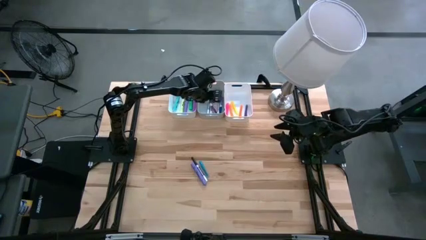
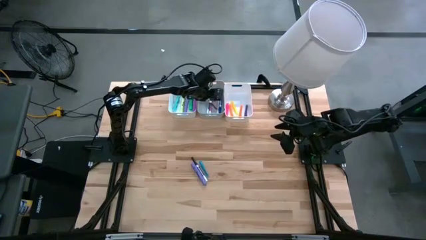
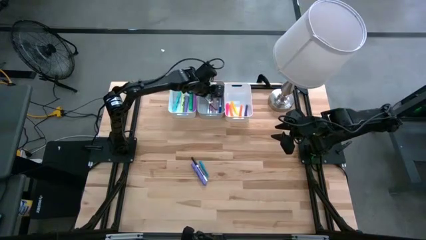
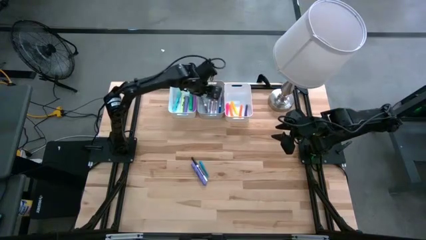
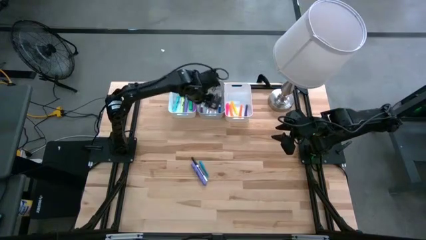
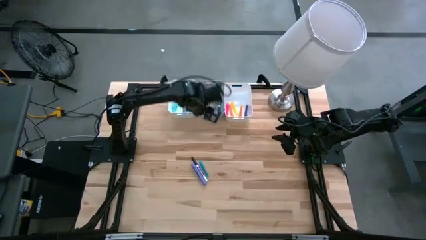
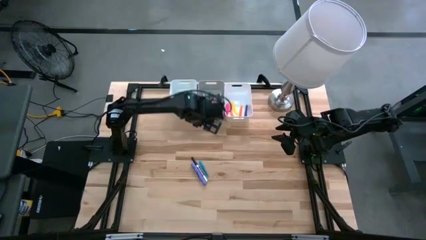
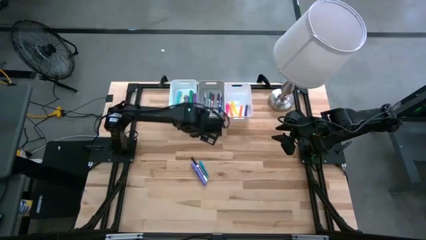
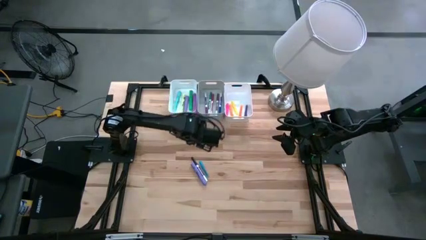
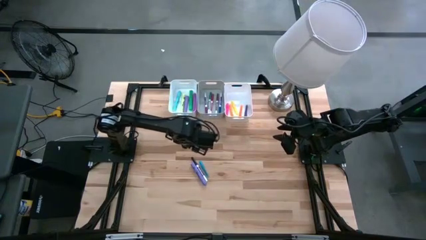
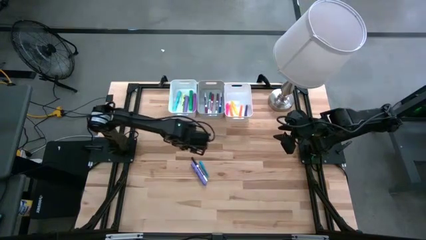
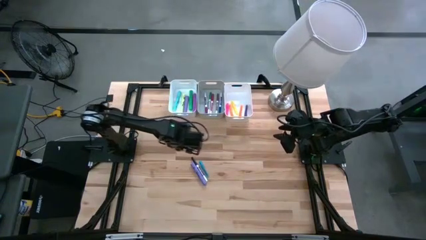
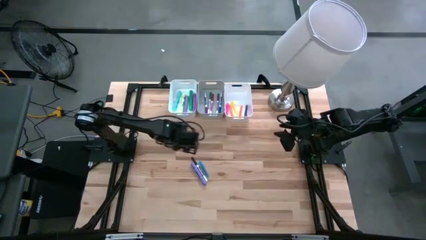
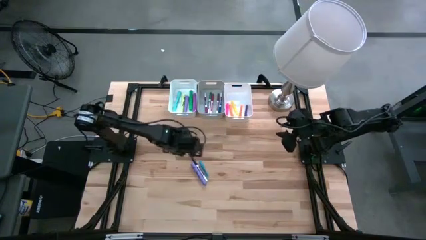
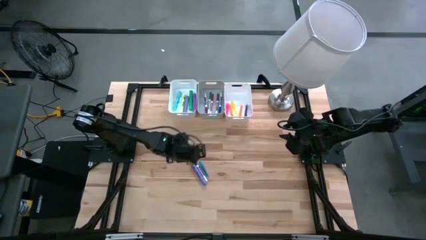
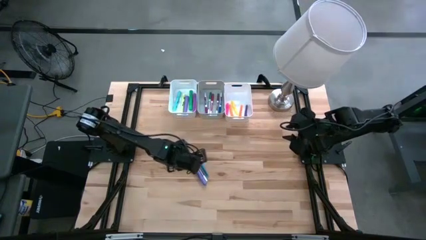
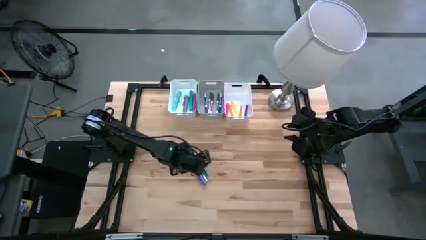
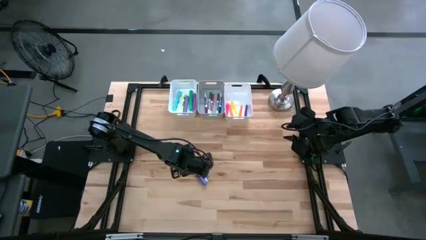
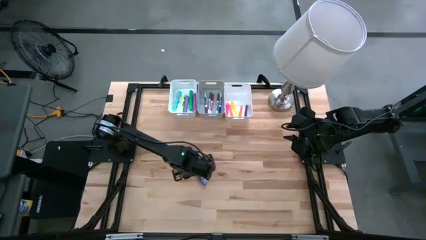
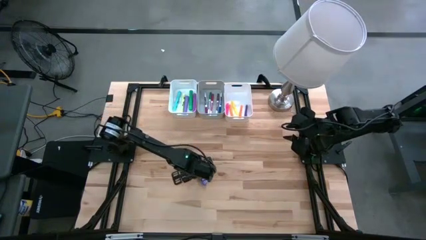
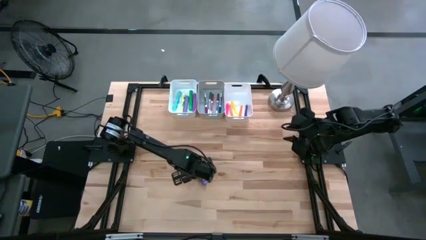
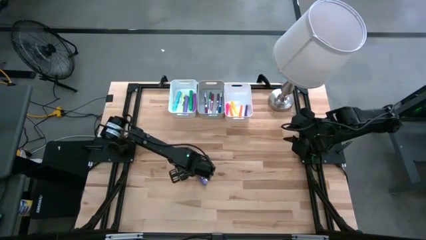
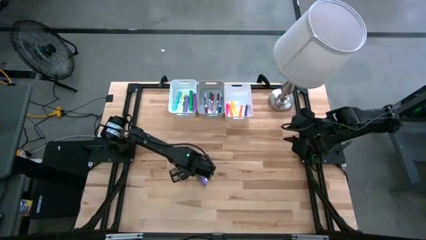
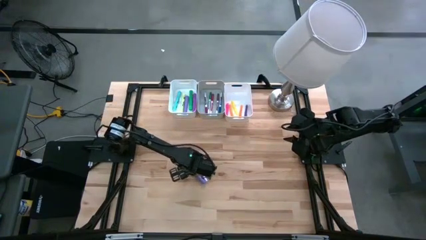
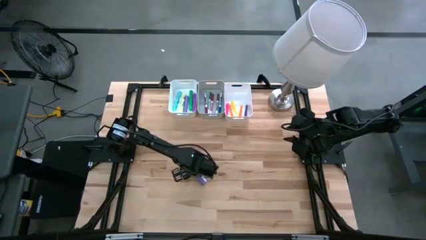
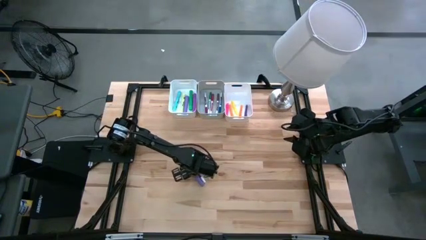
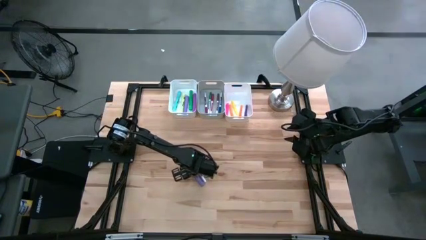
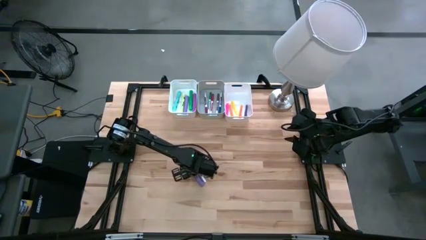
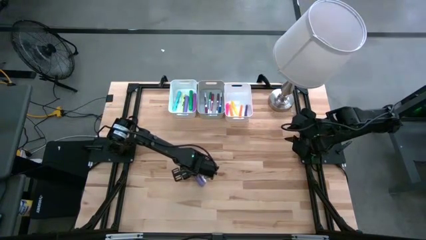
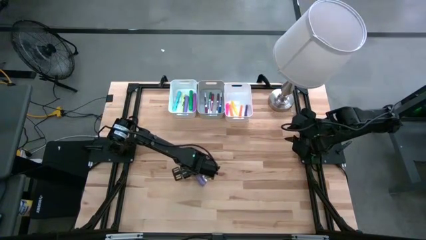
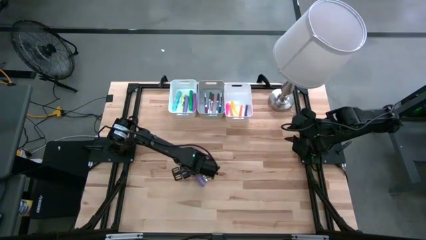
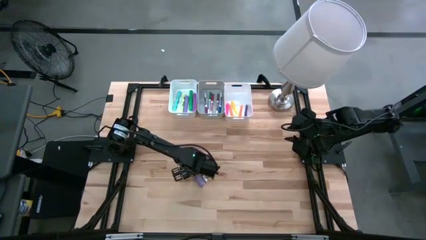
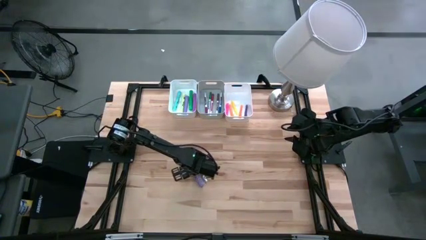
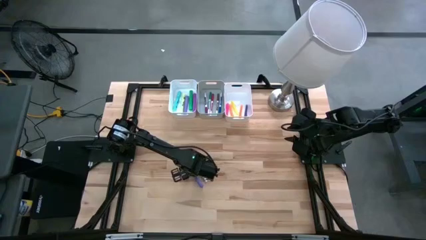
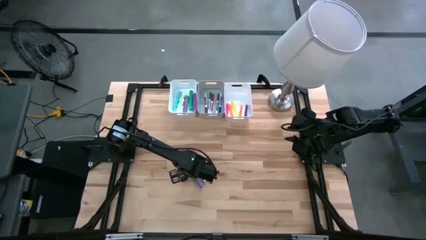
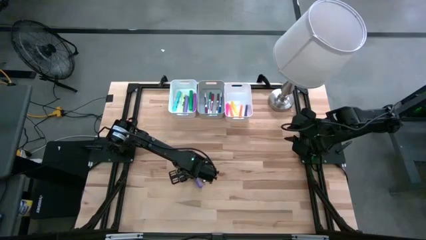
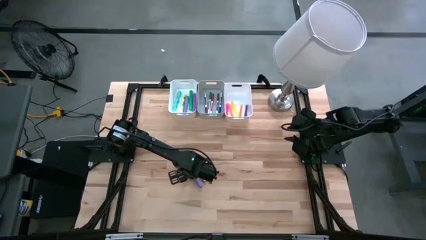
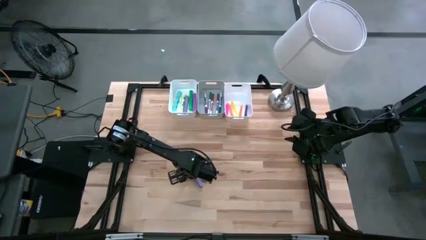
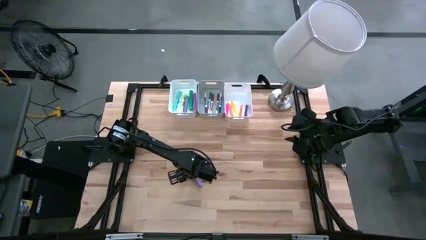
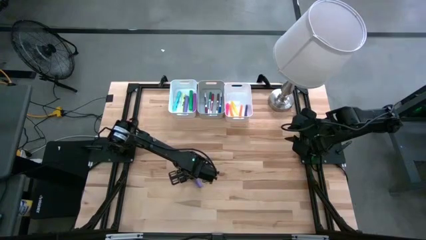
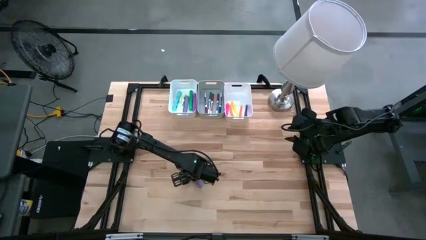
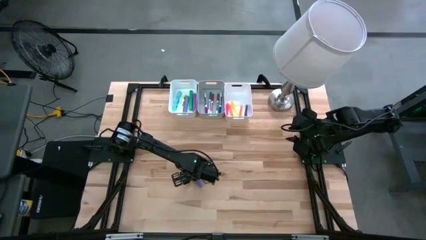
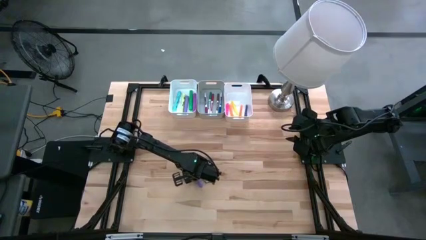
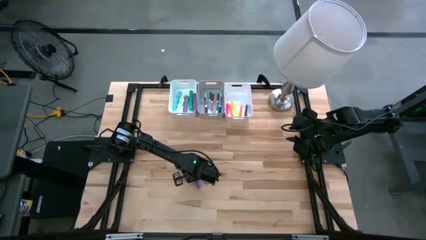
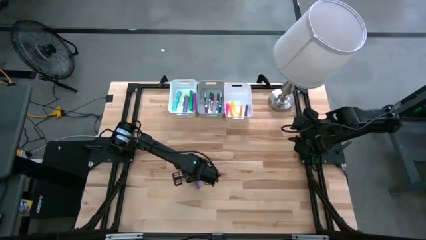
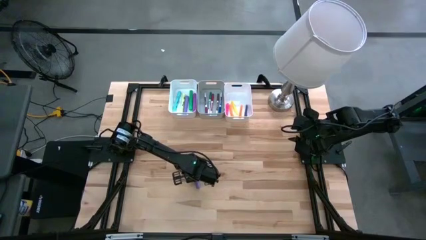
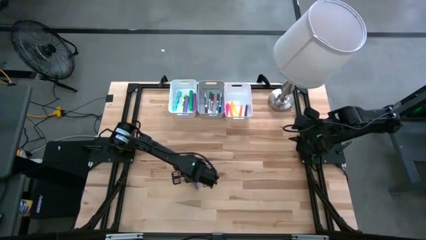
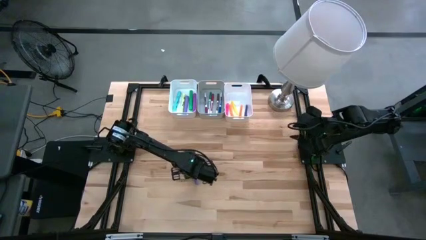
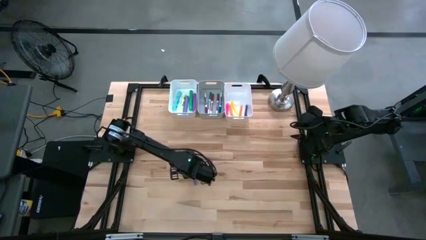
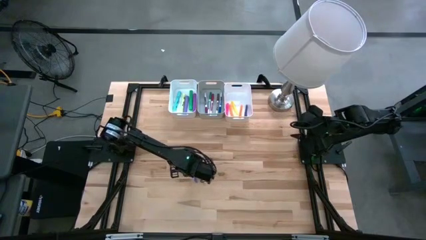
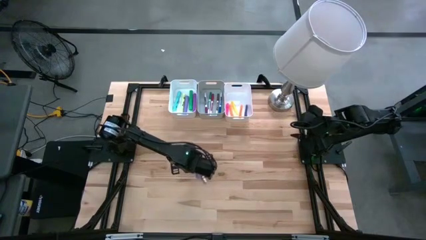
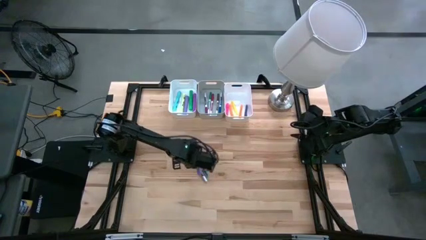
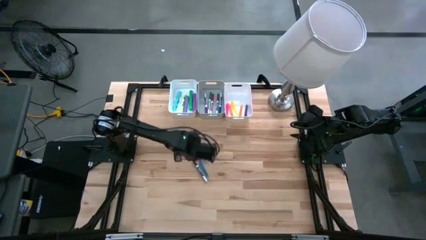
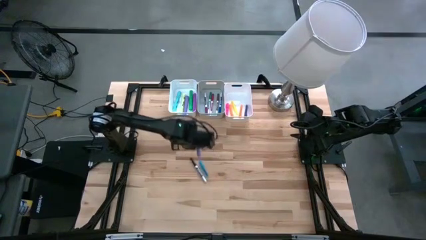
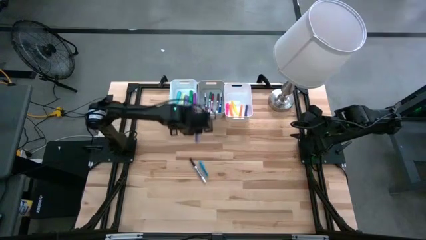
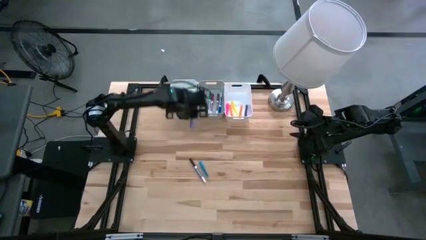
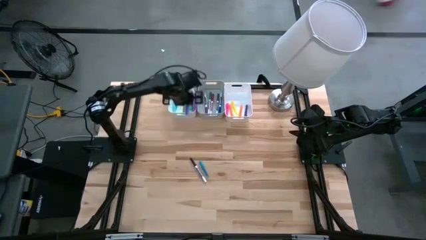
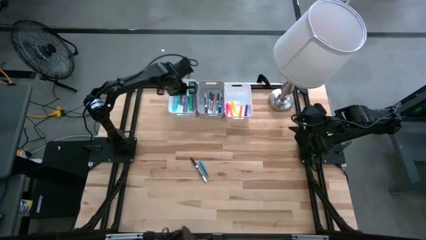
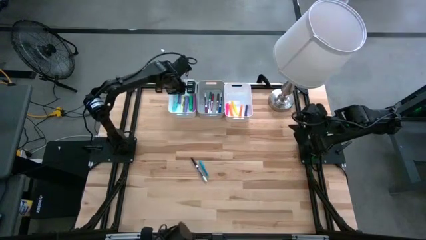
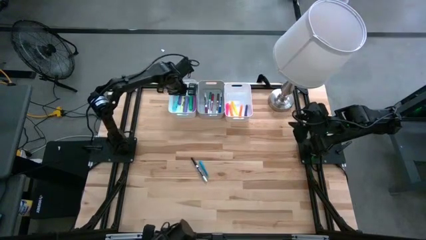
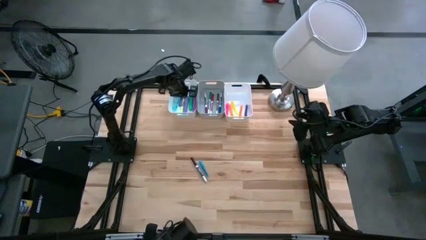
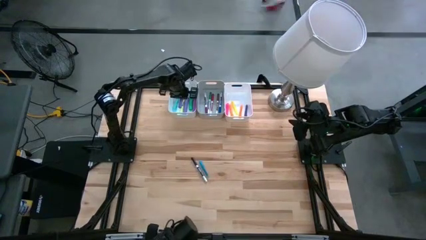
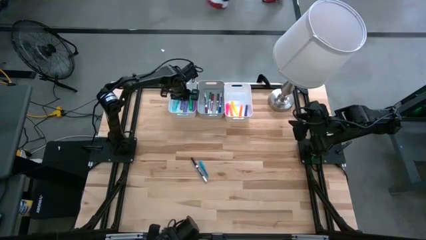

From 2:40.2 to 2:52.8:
Task: Pick & Place Markers
Put the purple highlighter pen into the left white bin

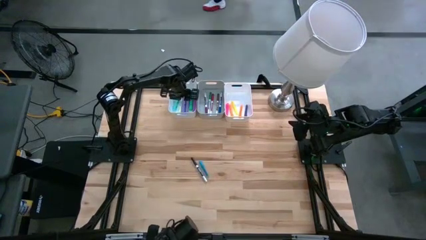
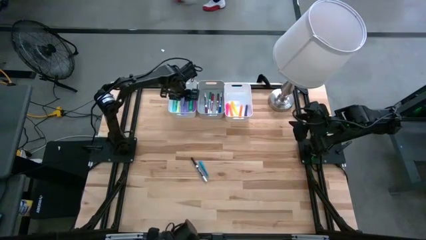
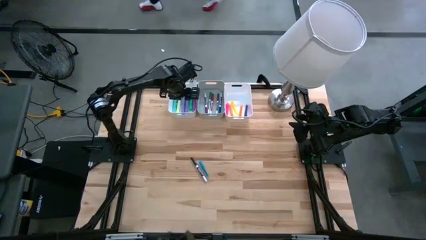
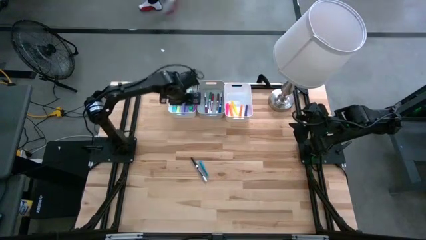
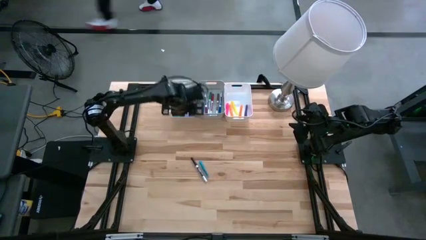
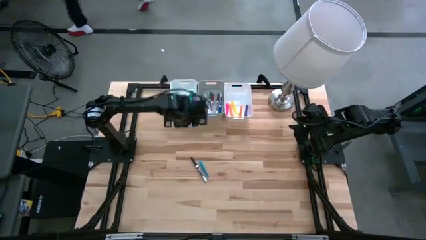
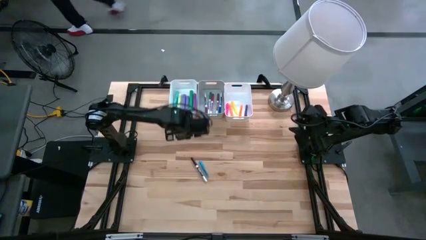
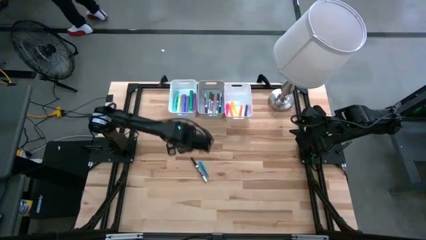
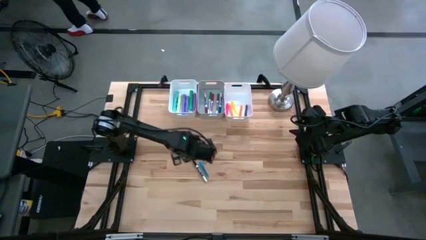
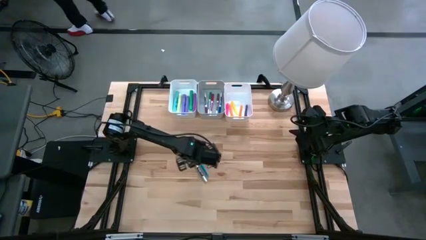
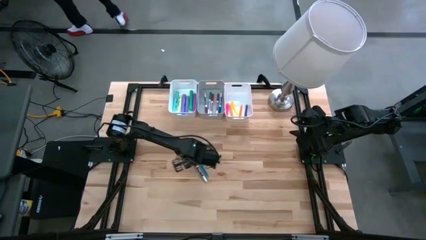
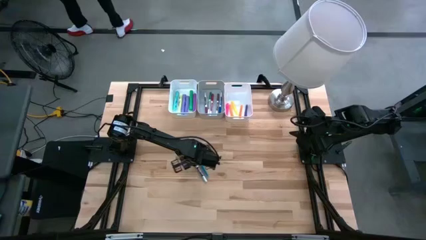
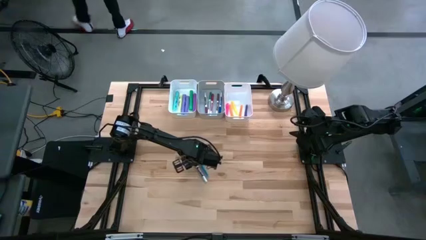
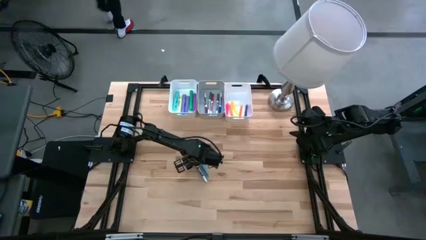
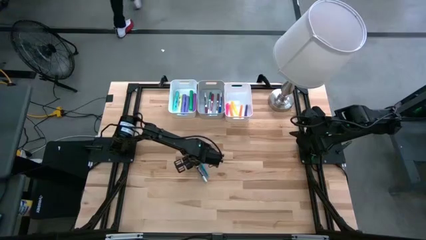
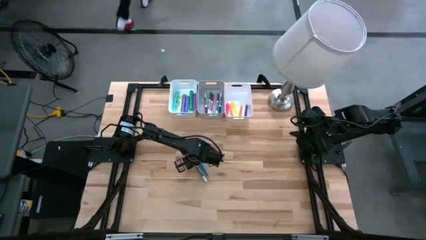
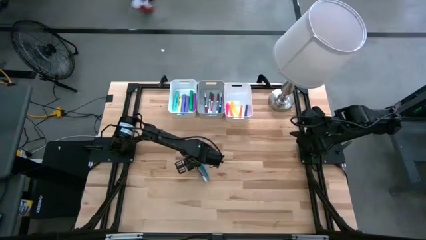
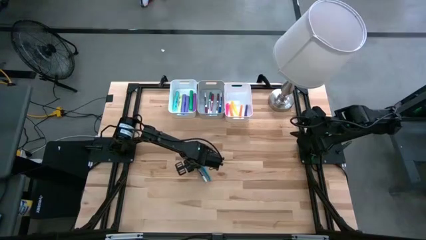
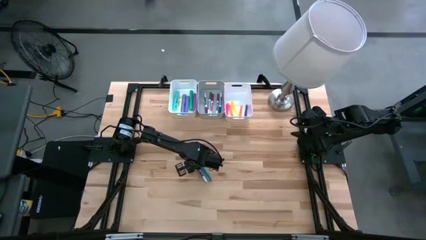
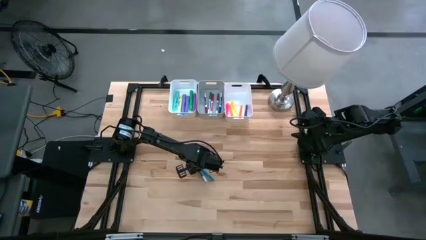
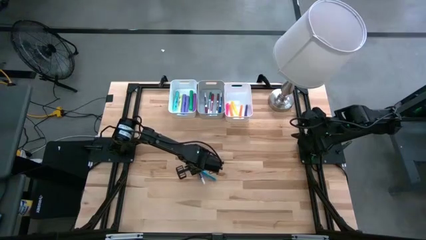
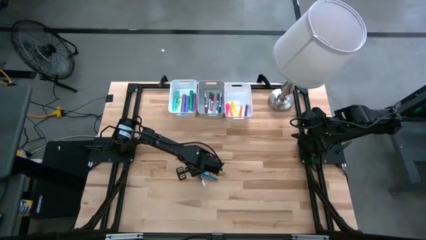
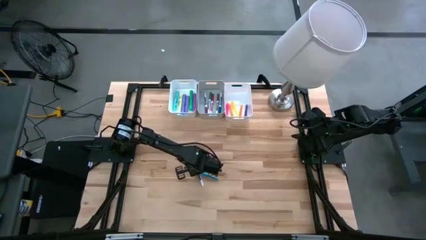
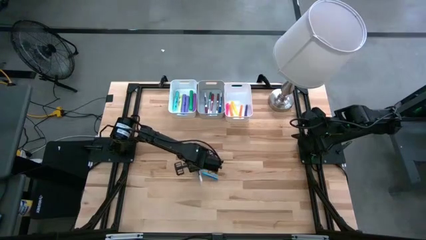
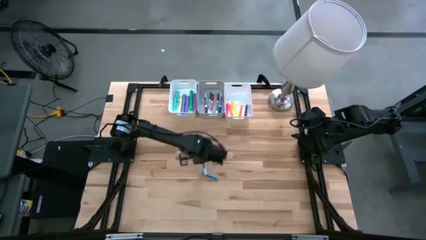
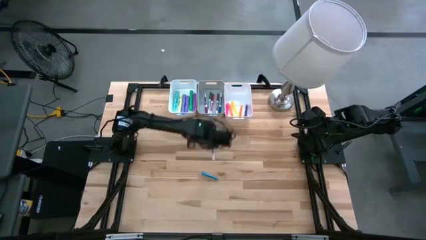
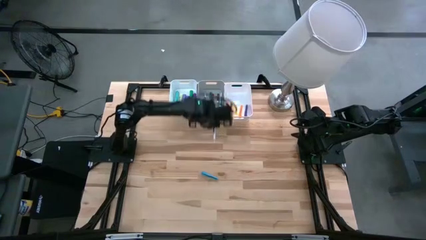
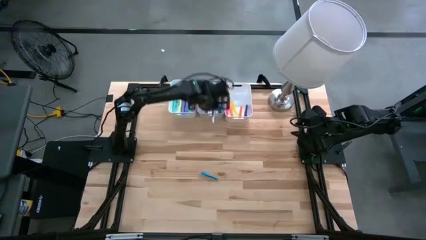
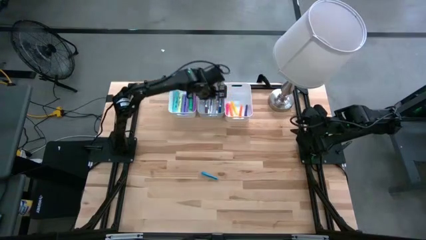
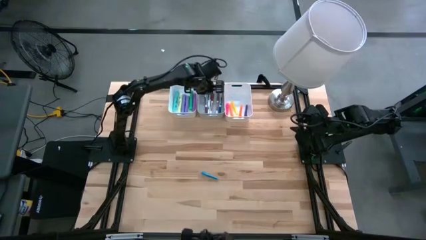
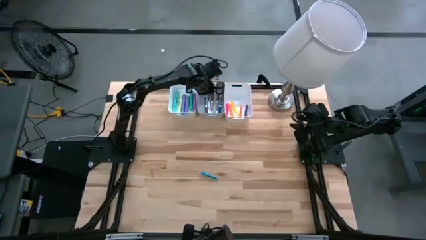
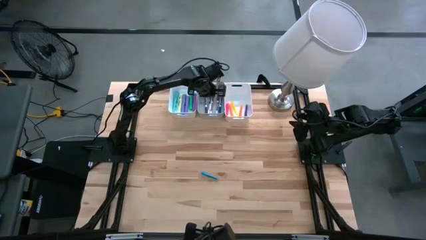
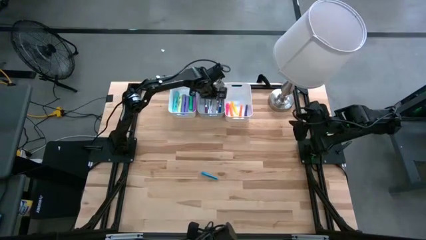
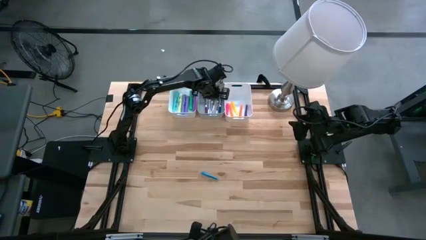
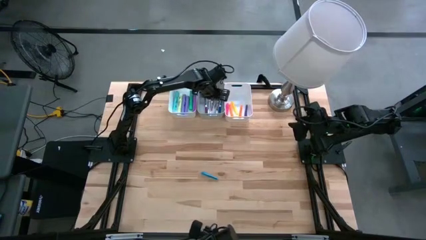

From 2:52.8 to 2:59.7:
Put the black marker pen into the gray bin
